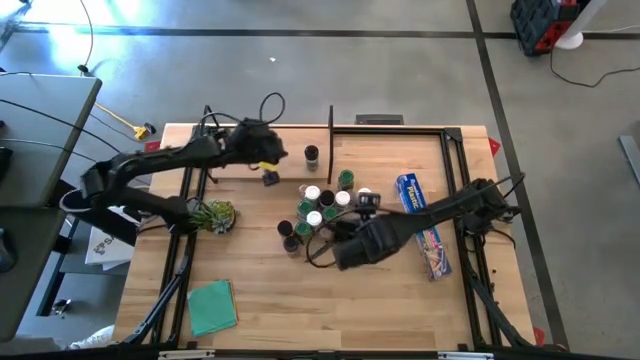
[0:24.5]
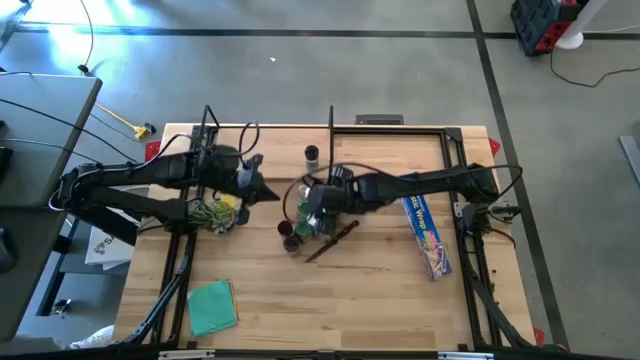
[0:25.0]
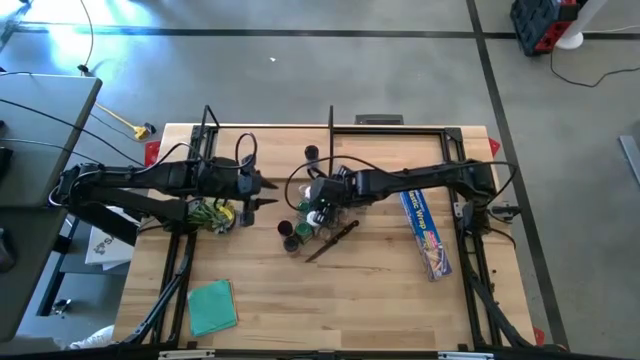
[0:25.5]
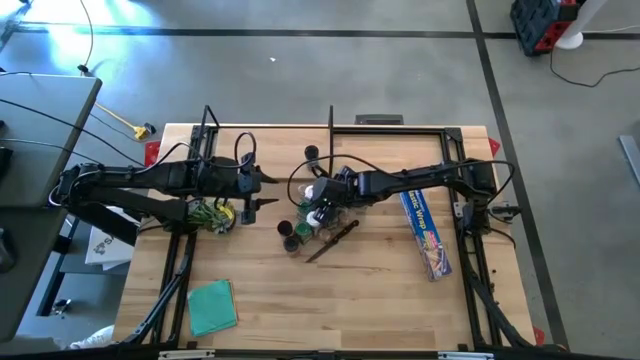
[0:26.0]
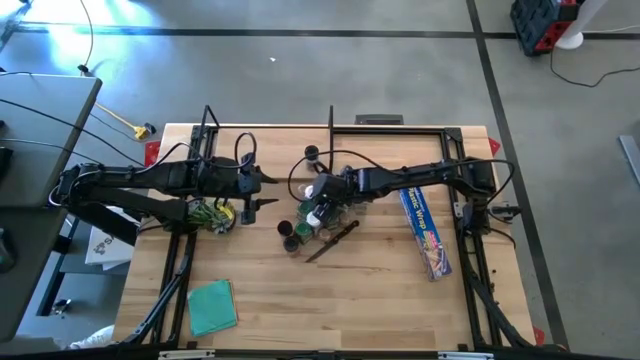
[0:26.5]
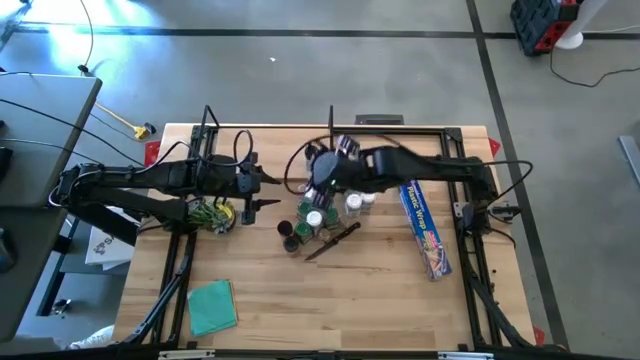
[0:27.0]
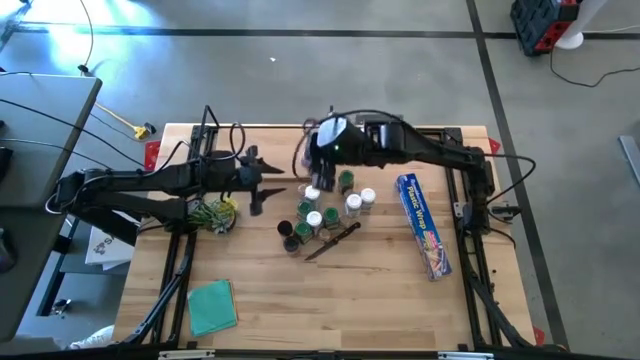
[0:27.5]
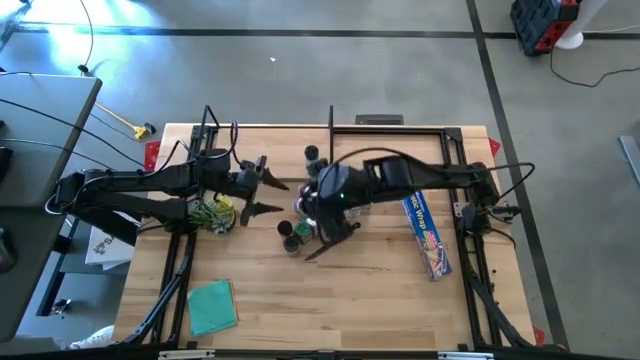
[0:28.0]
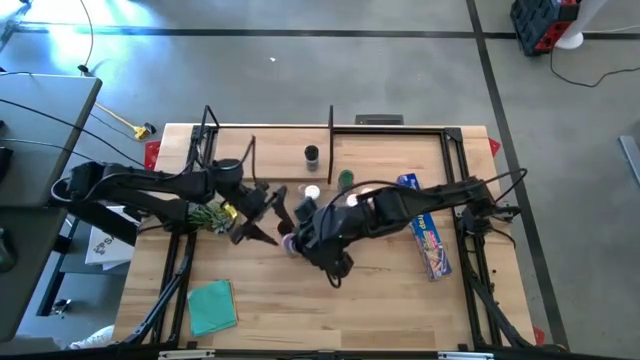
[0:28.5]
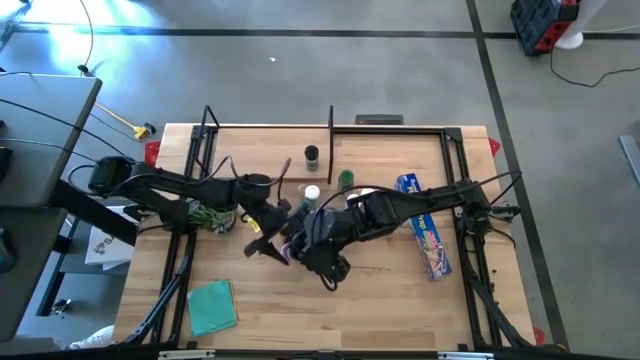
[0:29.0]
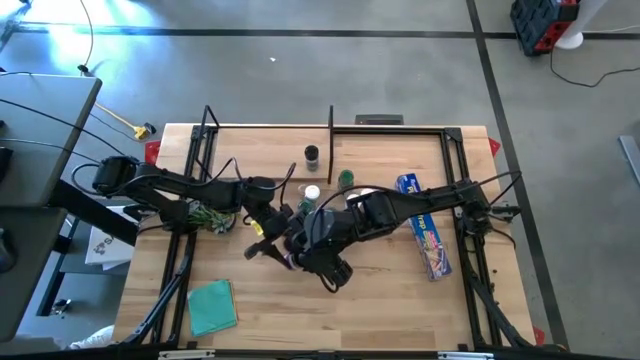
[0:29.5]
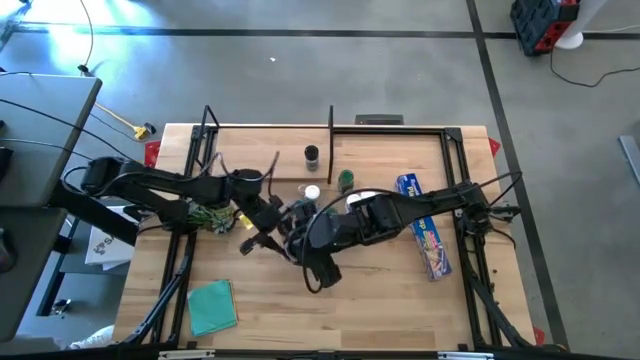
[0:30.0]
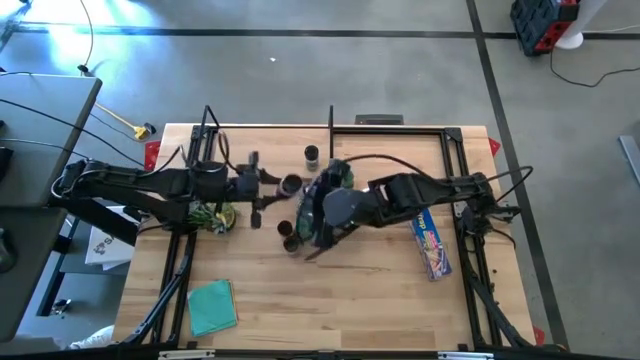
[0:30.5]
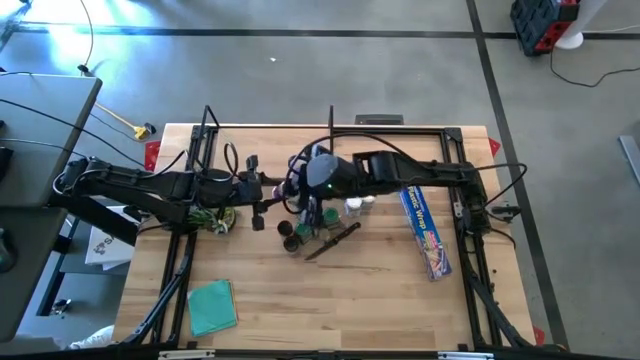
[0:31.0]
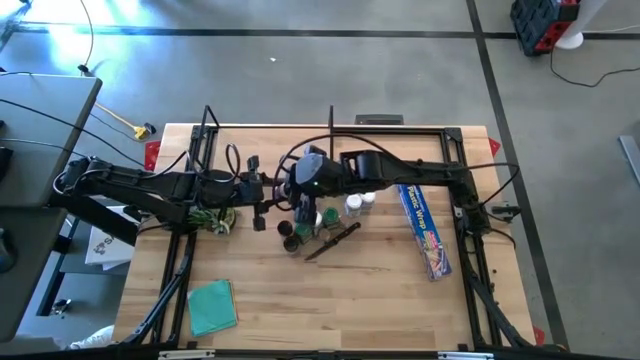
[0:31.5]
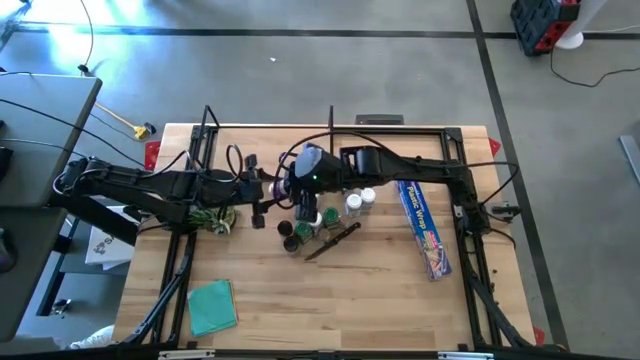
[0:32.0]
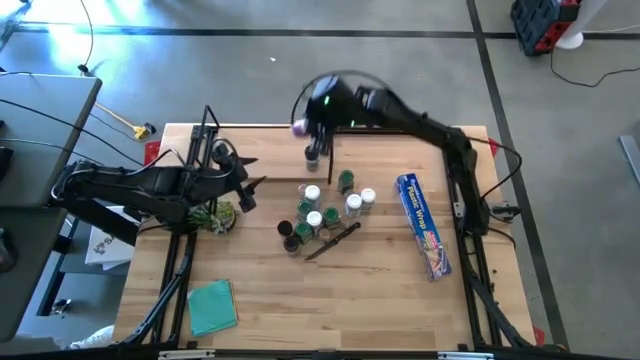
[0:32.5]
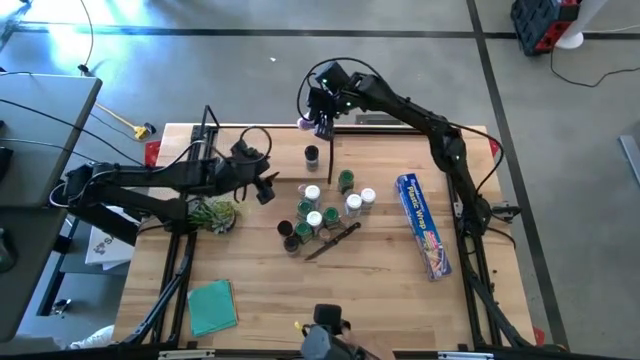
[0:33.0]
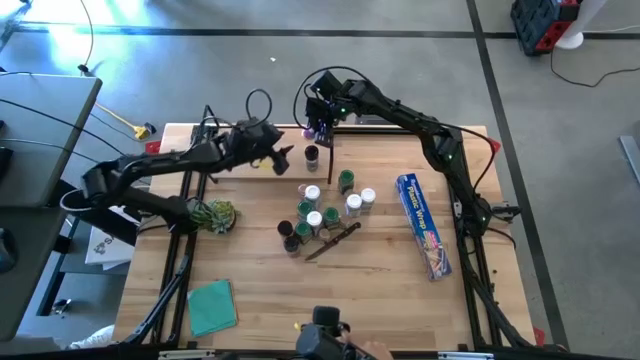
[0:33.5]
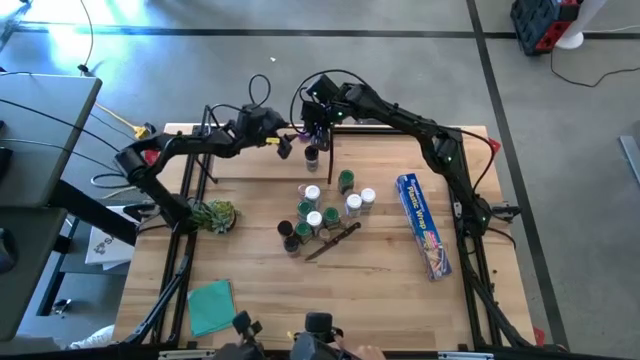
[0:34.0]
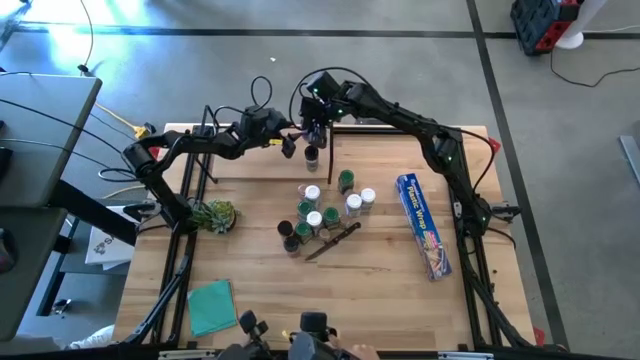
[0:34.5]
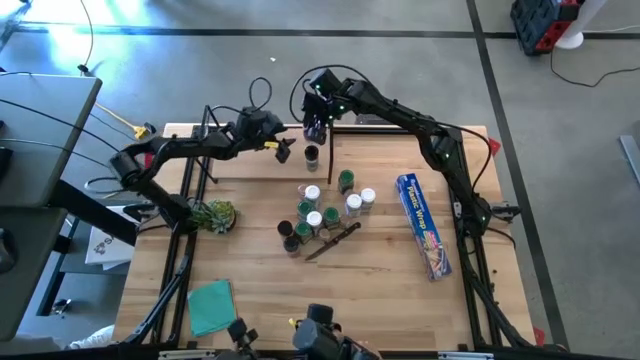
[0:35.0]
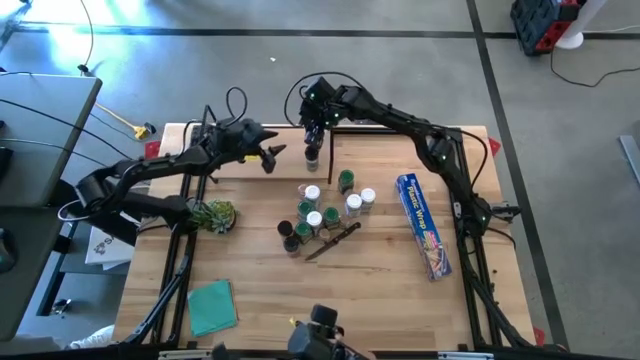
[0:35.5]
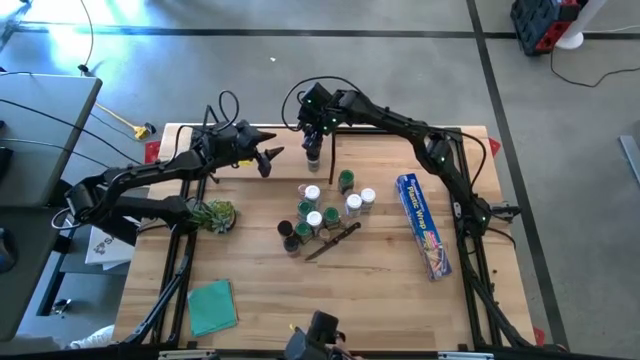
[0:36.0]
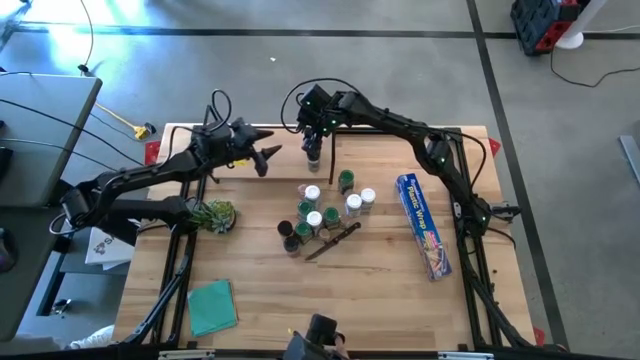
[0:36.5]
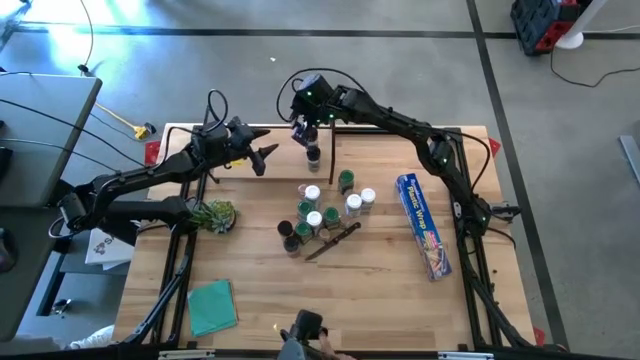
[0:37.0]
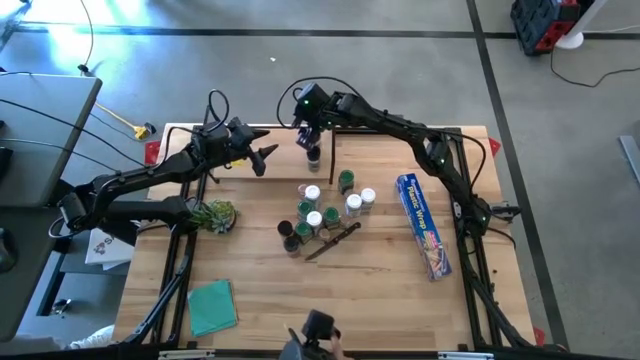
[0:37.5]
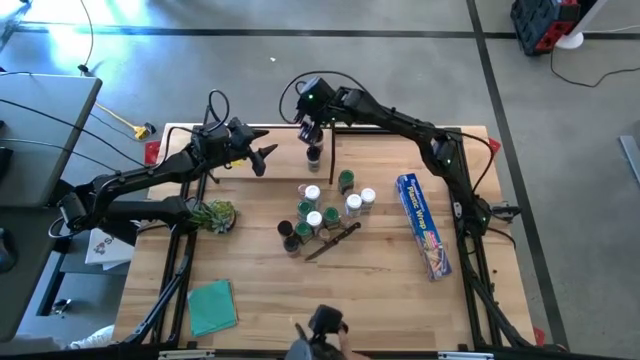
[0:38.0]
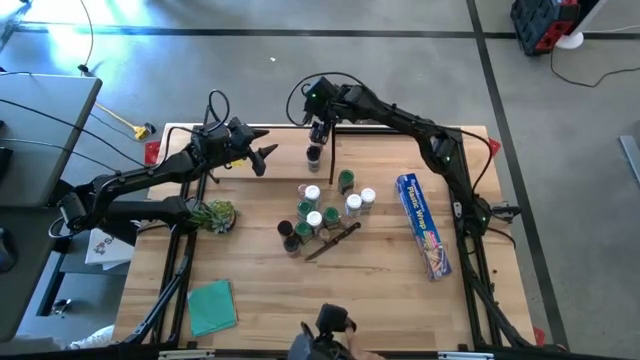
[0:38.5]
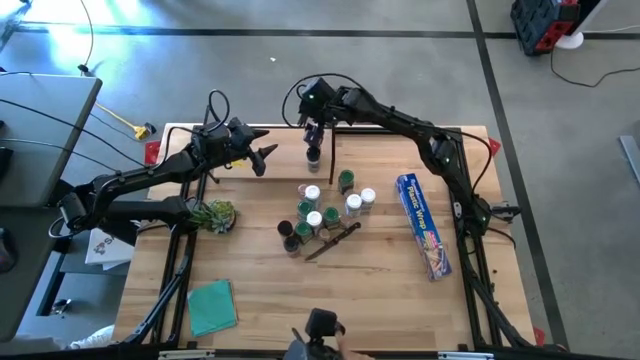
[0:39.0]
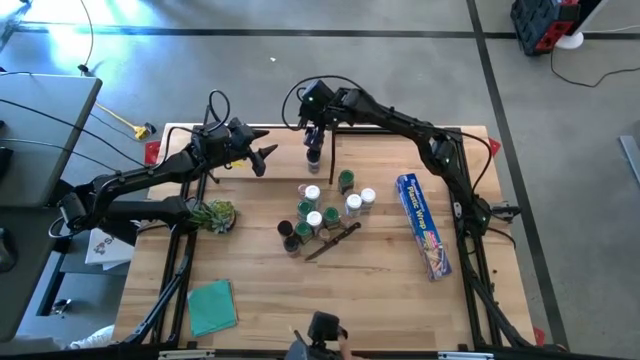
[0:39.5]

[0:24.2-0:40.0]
Task: Shelf spices
Put the black lid seasoning bottle on the shelf
